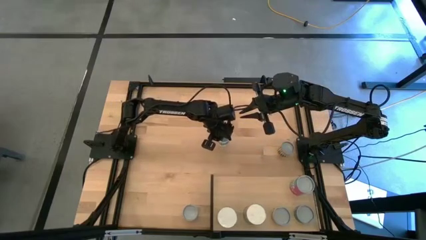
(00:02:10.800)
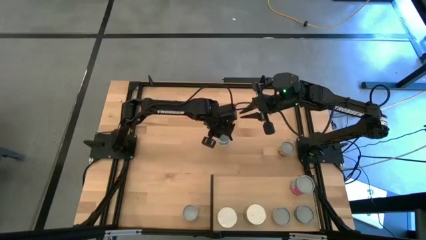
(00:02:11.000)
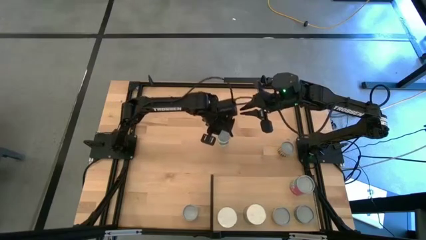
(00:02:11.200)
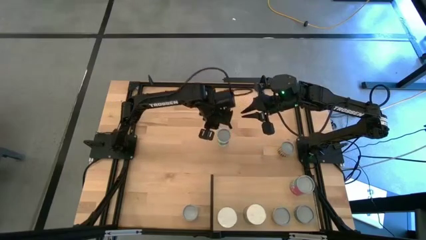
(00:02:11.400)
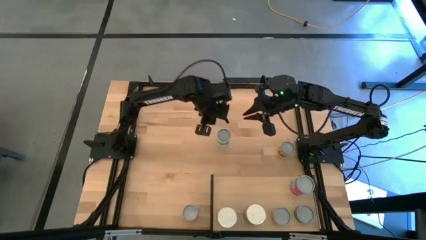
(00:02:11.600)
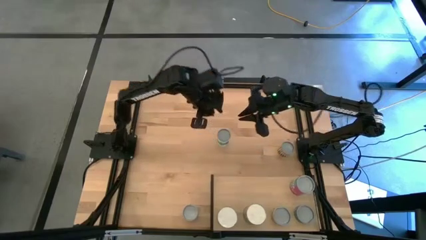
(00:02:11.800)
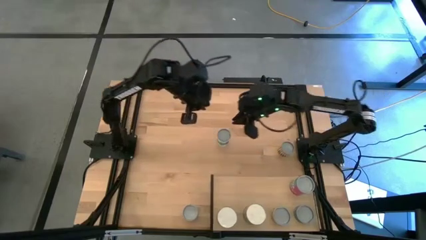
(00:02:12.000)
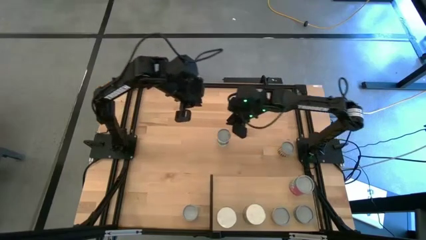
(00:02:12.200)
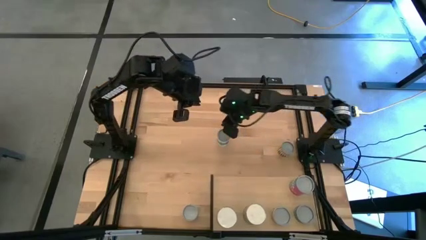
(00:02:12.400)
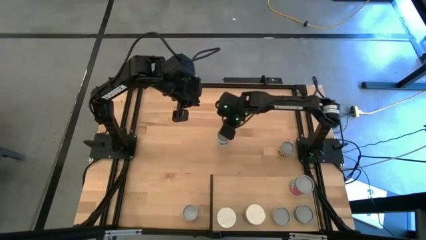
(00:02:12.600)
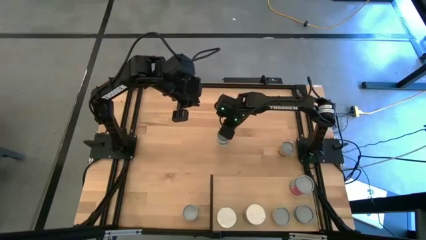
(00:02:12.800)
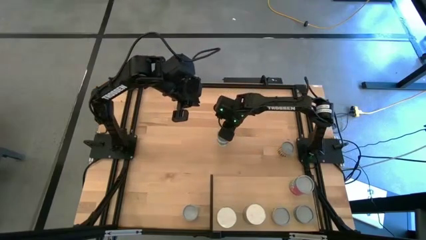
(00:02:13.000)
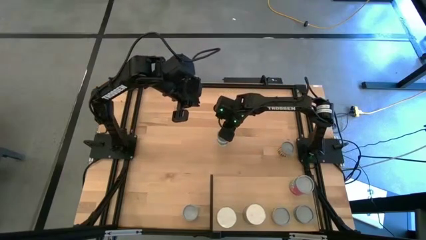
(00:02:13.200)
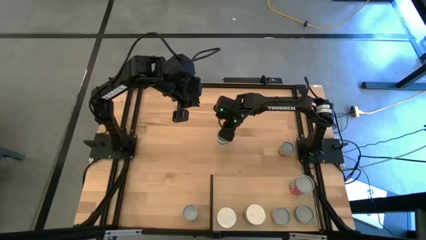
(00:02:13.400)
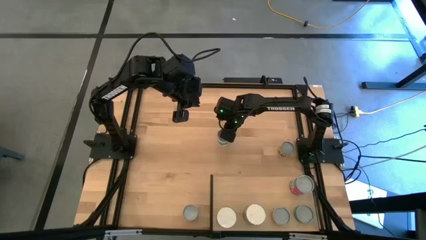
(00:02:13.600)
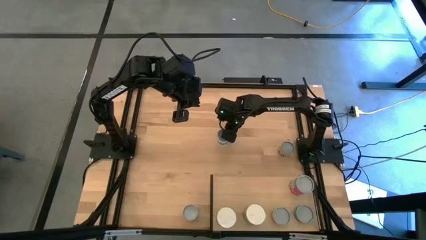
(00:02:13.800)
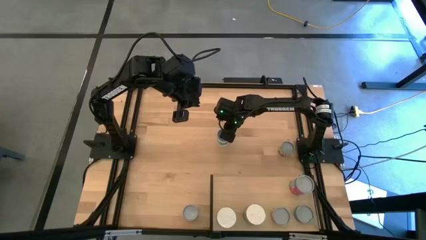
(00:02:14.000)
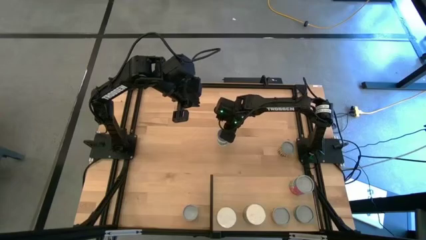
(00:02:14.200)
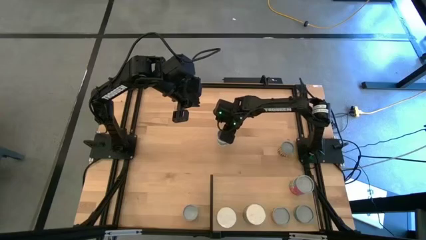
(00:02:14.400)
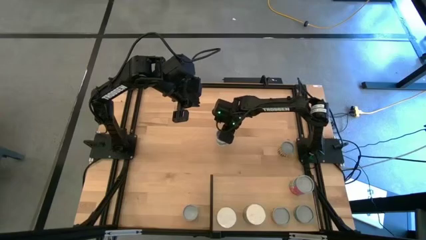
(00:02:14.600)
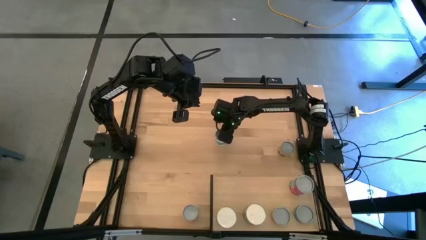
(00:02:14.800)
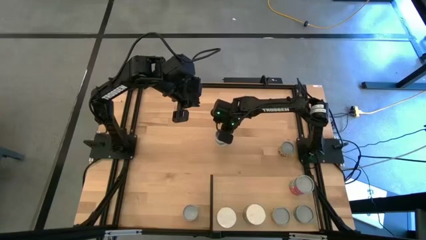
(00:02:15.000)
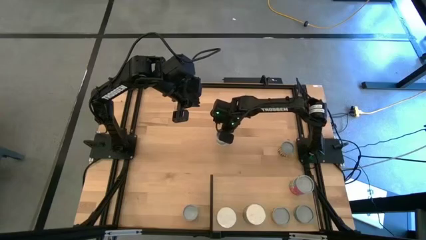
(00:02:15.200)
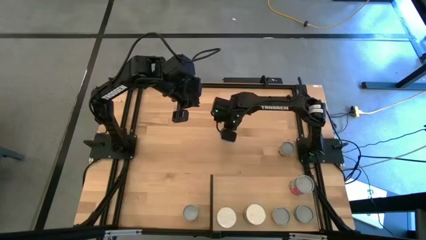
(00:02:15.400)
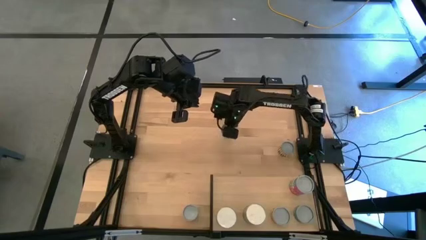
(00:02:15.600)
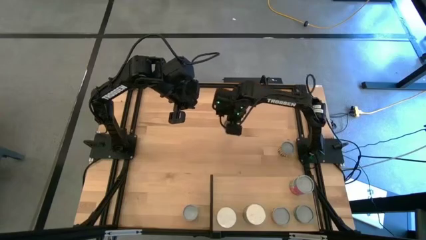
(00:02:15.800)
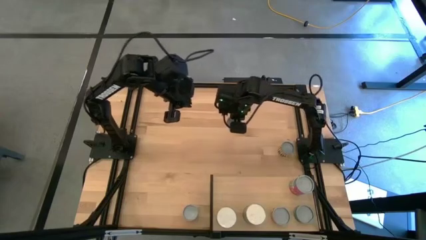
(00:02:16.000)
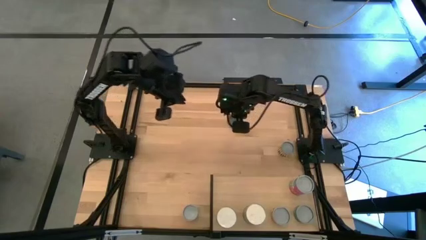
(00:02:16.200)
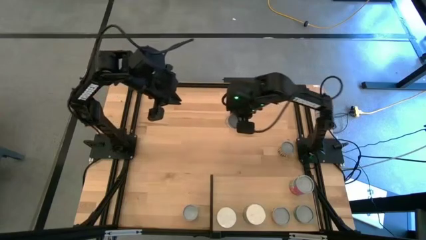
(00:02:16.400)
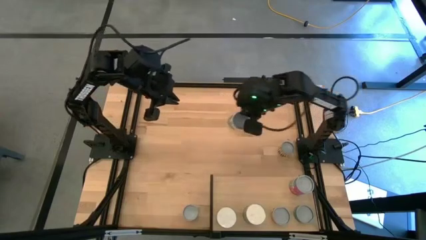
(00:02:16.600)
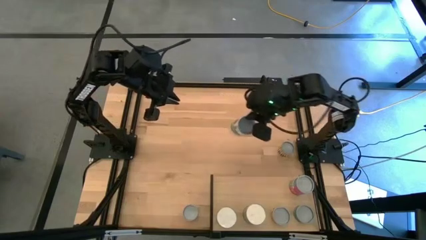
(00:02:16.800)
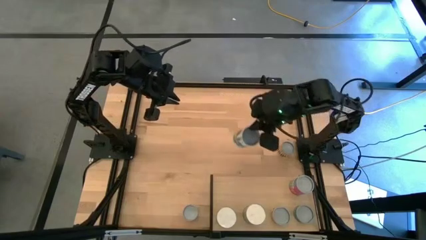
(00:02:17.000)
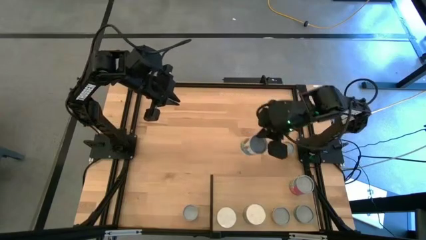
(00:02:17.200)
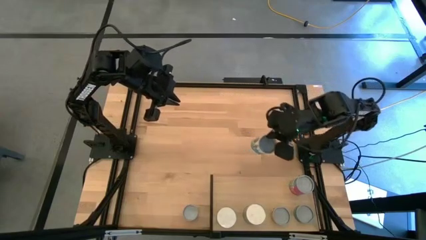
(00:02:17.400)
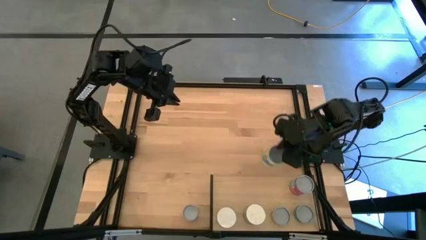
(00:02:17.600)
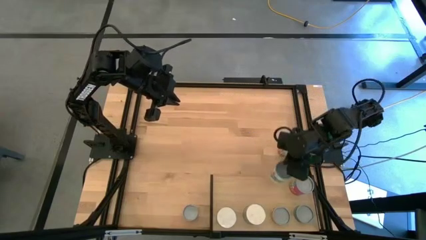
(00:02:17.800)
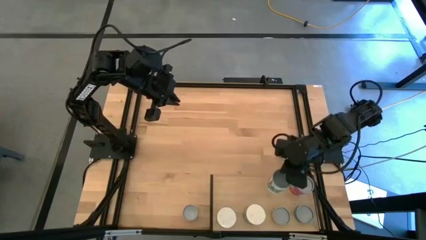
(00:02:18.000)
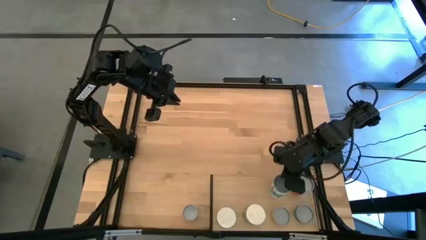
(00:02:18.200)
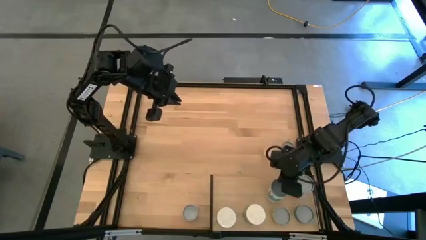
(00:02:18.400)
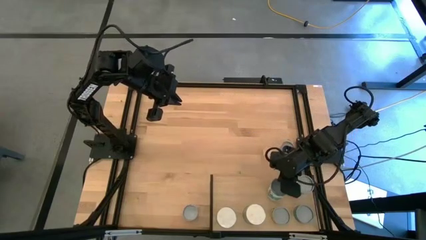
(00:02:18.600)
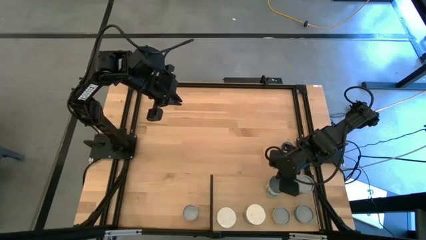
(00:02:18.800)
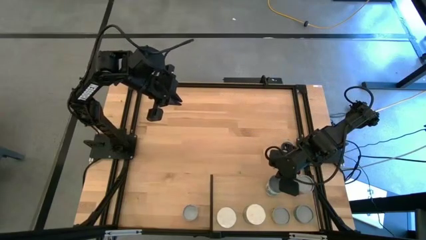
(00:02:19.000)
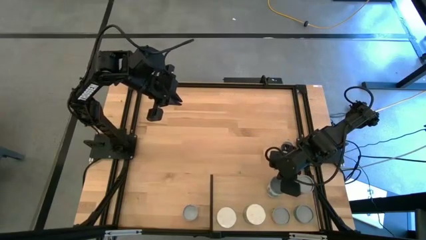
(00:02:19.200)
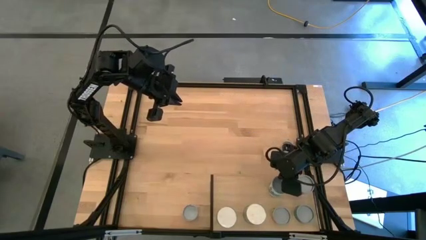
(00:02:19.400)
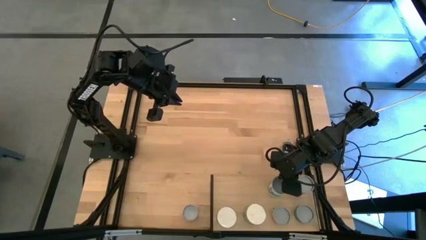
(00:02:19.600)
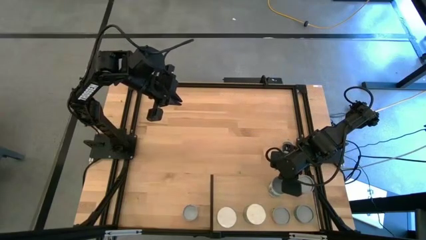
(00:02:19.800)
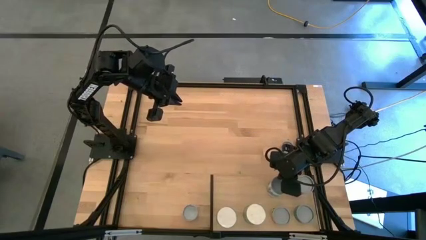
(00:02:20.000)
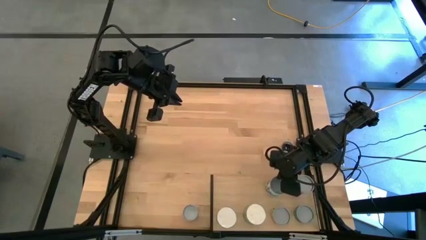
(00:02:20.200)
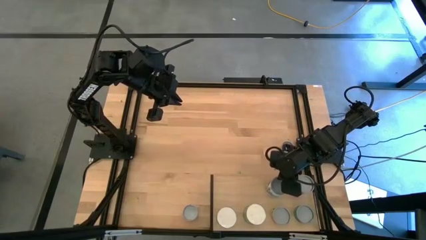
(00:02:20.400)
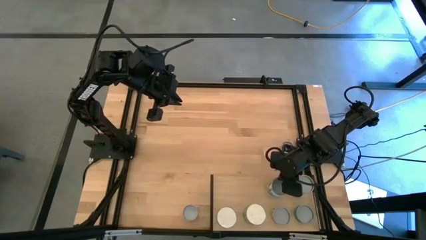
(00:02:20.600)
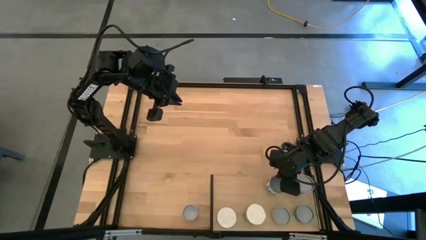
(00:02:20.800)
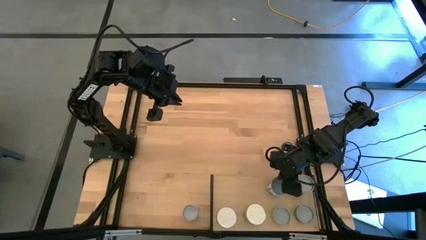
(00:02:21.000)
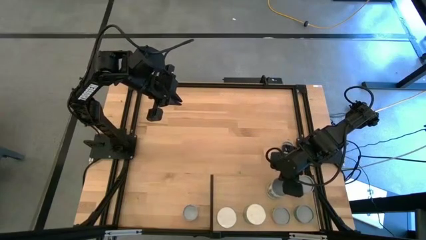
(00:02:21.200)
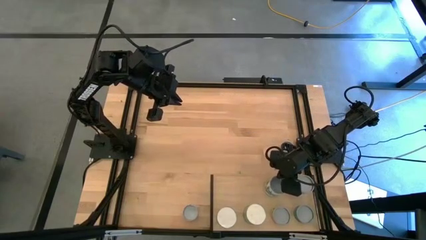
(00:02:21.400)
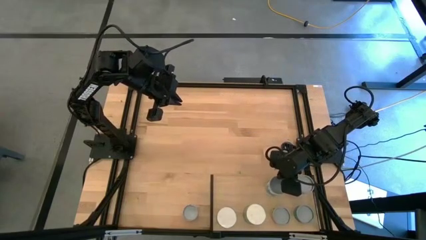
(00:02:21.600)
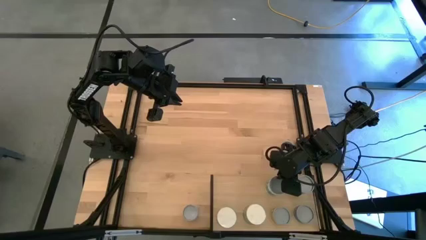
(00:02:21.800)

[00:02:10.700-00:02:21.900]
Task: Pick and place cans onto a shelf
Put the canned mixed vegetables on the shelf

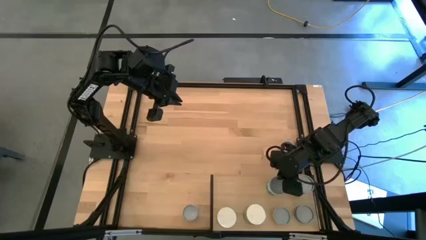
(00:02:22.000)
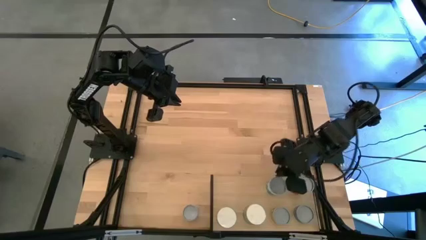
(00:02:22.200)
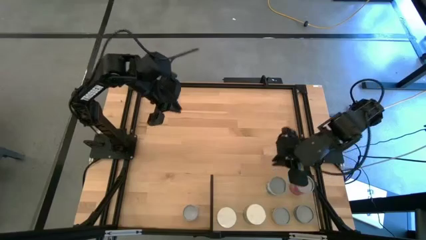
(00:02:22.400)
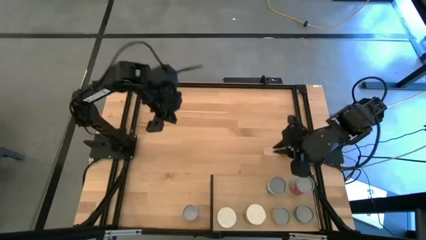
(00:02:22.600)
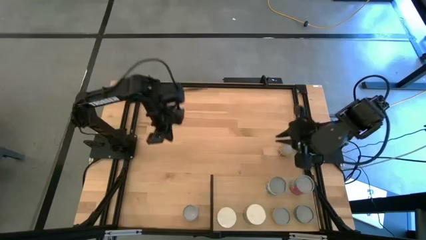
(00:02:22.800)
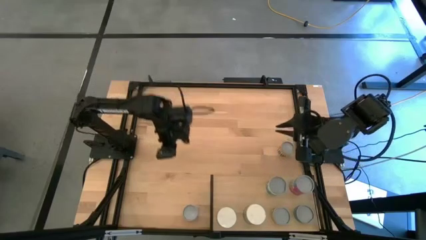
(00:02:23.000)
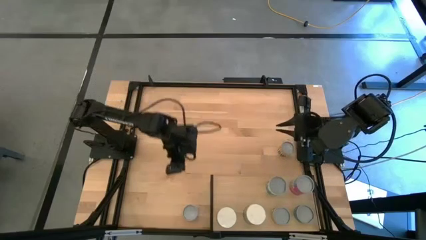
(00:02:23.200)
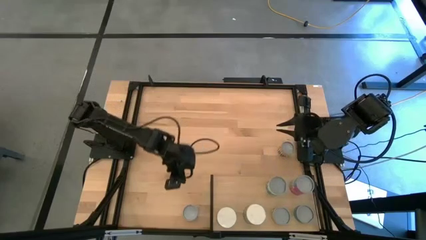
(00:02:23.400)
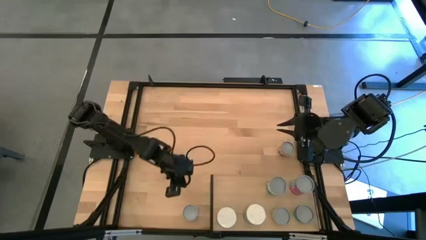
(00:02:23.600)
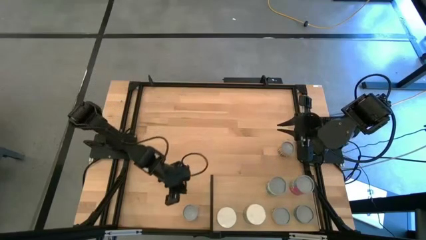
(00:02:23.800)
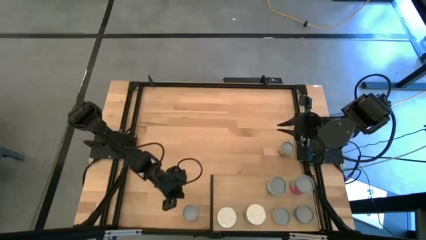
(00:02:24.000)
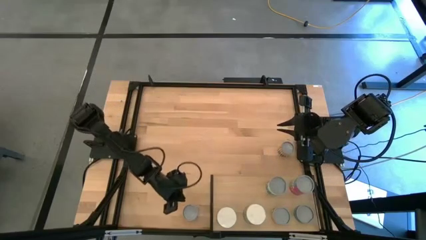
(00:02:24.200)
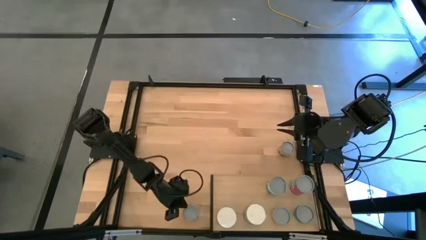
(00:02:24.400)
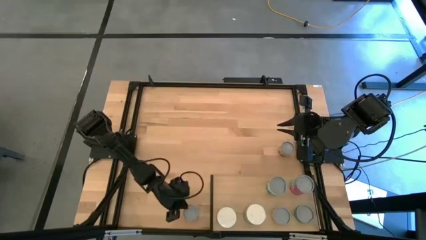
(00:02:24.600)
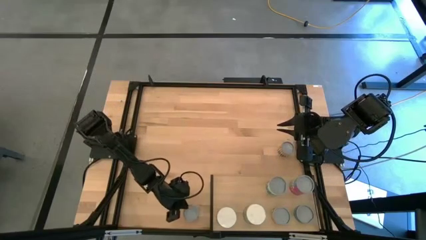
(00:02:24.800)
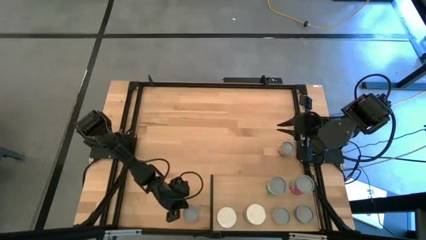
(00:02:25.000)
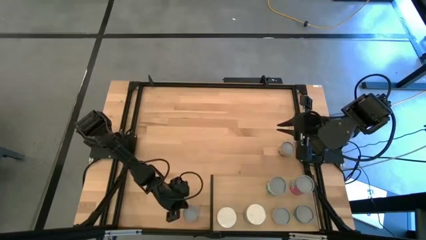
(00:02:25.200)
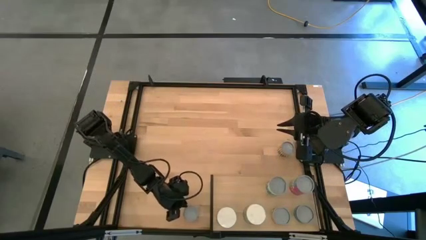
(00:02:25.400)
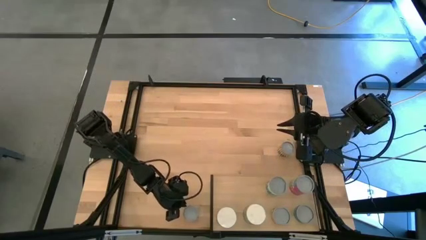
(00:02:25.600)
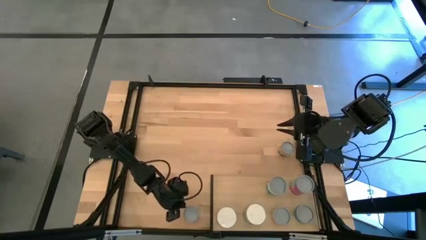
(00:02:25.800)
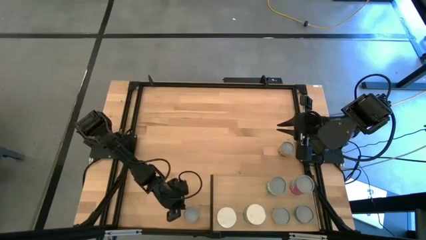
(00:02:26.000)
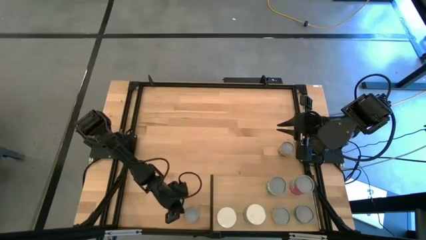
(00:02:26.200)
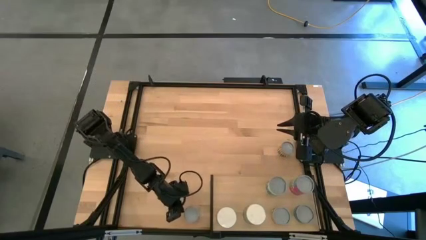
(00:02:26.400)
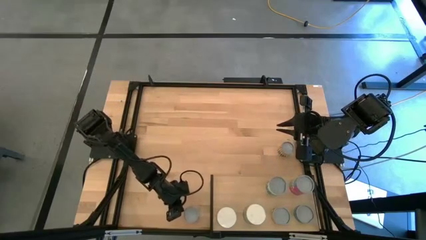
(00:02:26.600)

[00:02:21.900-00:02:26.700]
Put the canned meatballs on the shelf
